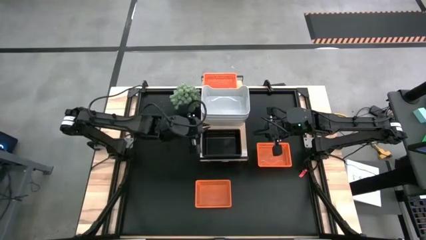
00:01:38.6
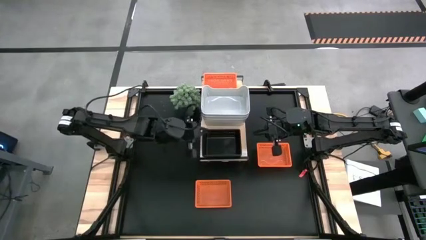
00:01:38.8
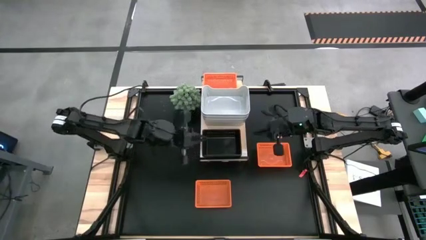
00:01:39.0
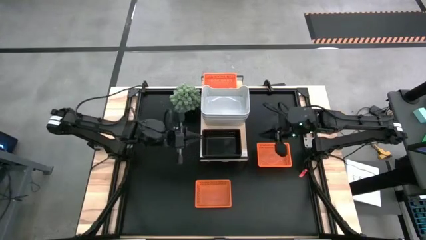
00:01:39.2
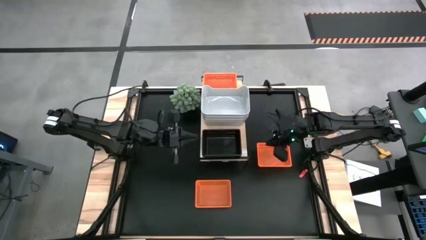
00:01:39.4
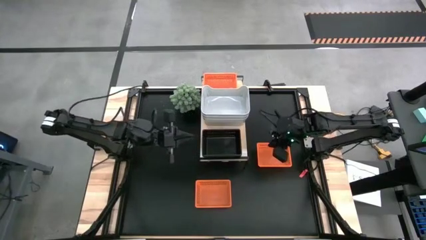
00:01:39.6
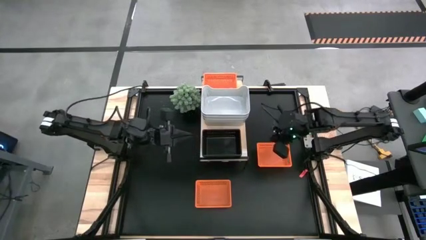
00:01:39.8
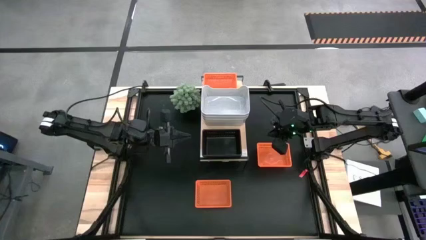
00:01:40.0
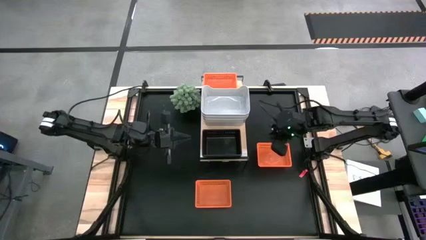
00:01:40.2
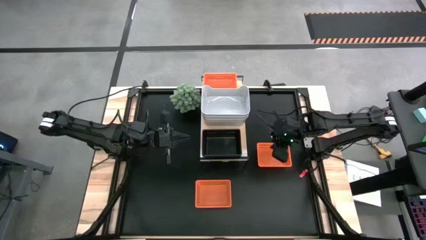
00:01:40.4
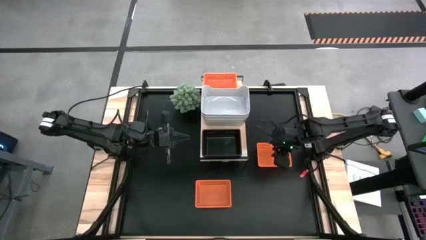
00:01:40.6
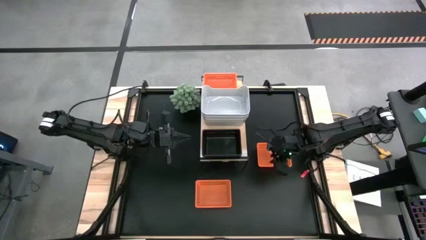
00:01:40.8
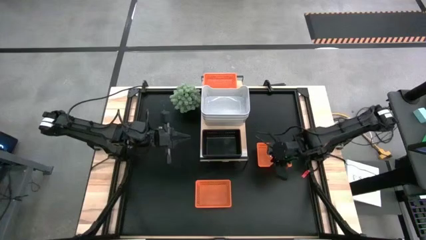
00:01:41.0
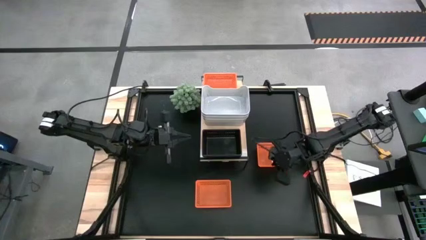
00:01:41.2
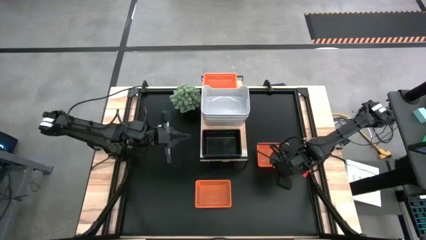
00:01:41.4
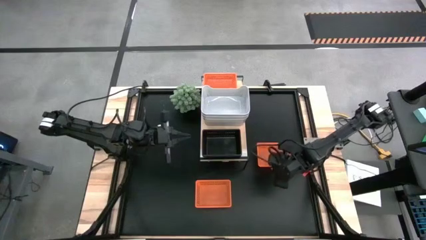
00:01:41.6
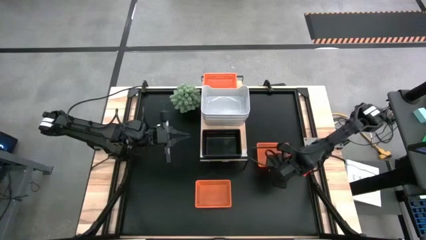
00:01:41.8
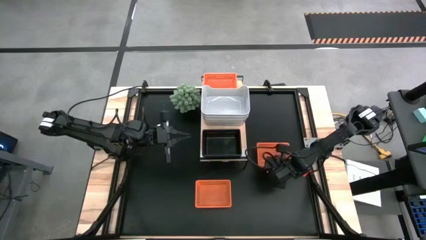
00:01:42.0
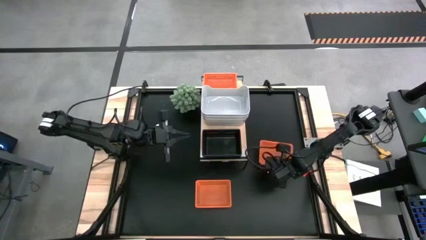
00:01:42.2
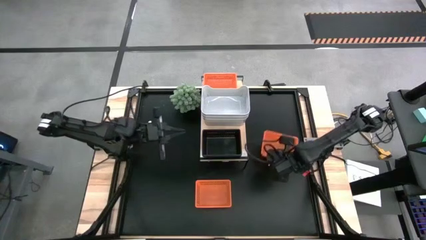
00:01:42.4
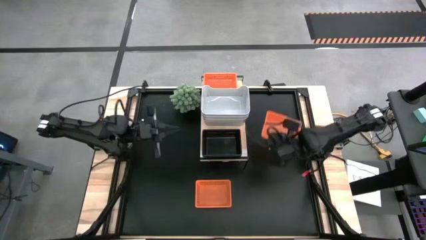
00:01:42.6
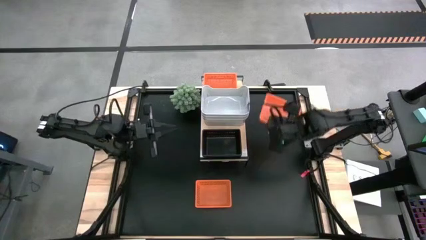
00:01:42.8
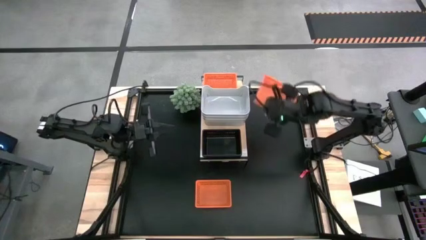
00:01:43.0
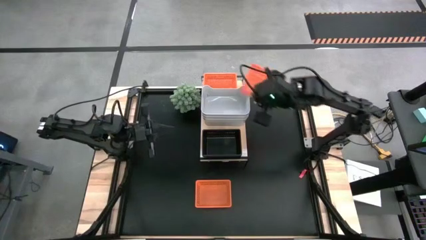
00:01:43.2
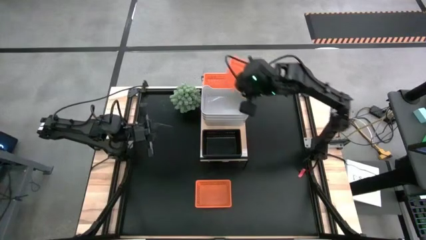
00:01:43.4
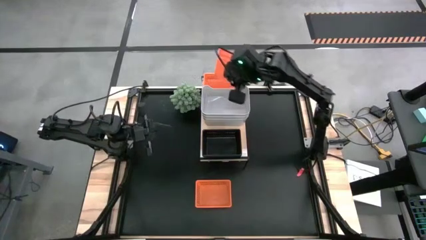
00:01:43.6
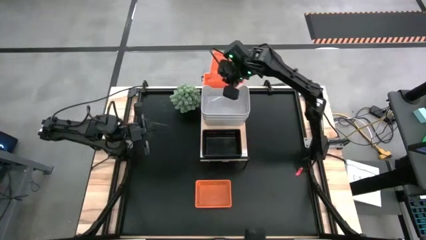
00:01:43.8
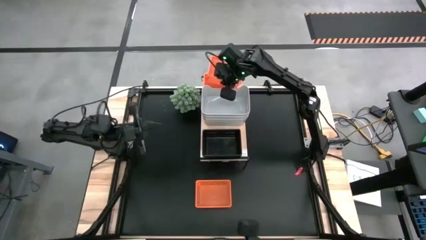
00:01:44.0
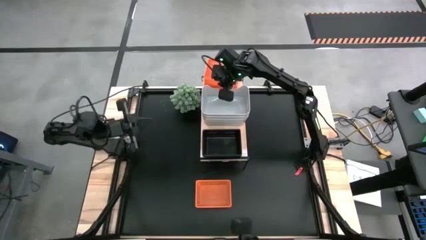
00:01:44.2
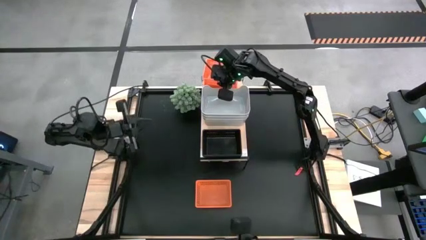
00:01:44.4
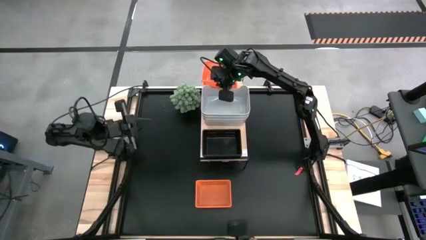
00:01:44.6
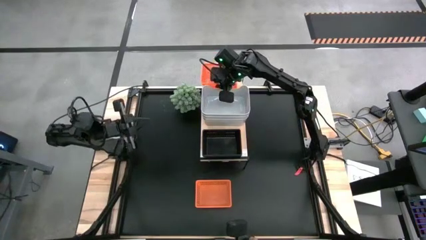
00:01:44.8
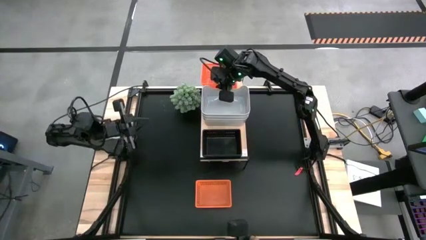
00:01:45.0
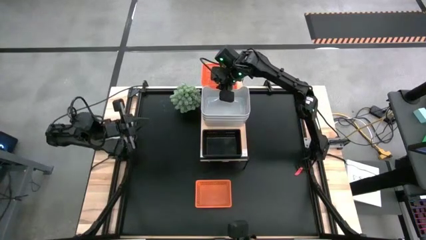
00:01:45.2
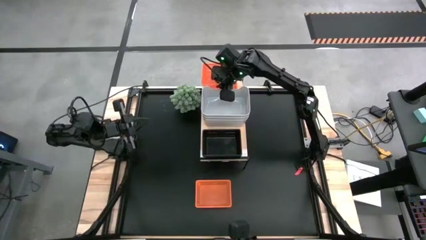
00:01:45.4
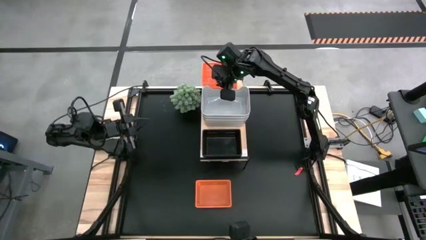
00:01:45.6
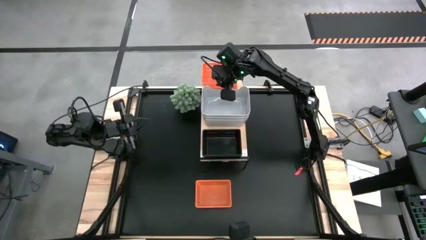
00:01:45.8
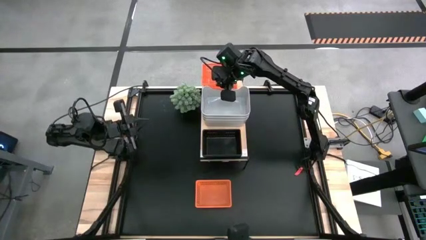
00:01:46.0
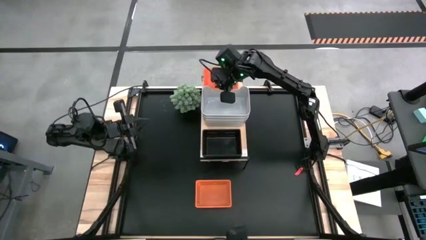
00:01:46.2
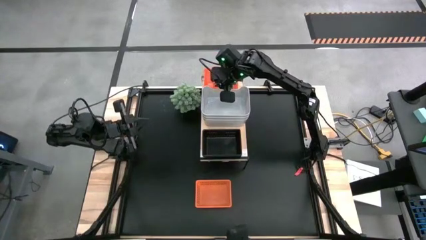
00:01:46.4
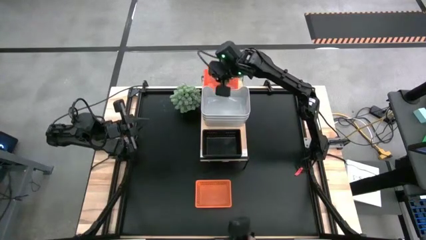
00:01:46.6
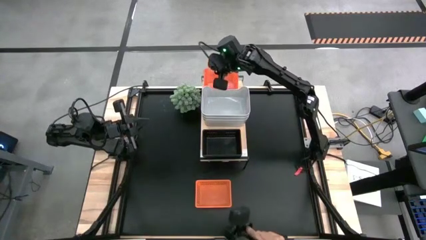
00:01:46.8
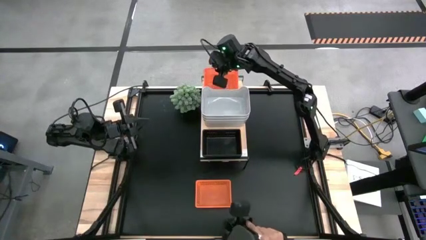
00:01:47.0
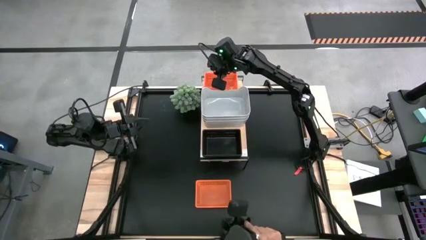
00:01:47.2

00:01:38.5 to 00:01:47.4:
Task: Stack baskets on shelf by color
Stack the top orange bin into the orange bin on the shelf

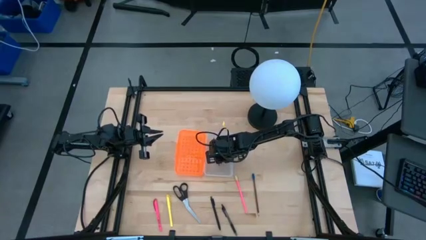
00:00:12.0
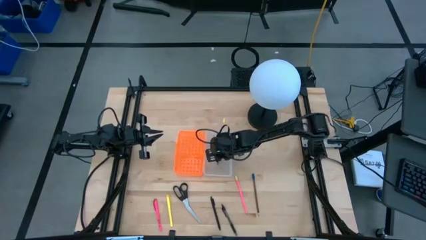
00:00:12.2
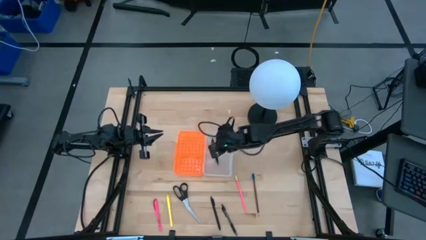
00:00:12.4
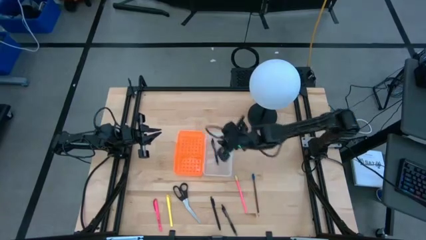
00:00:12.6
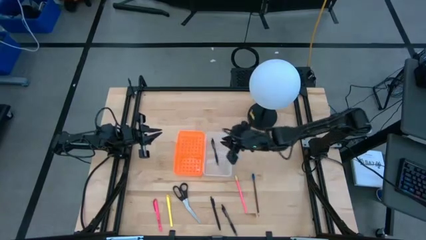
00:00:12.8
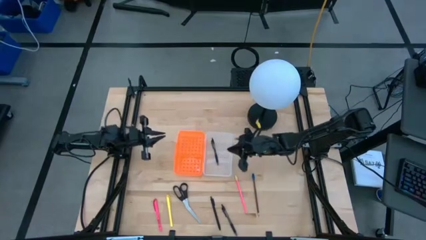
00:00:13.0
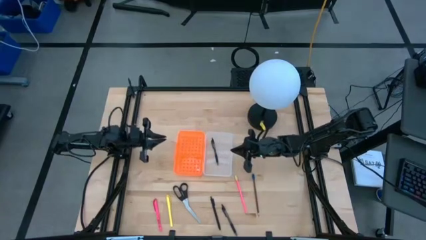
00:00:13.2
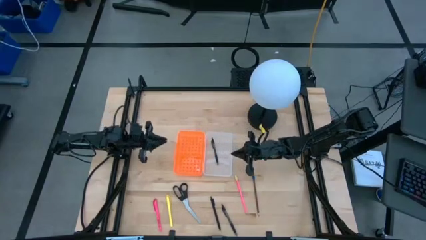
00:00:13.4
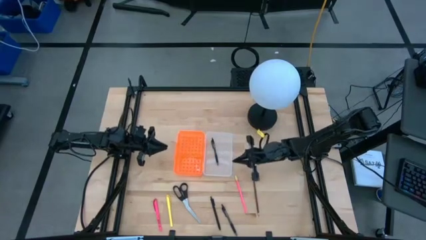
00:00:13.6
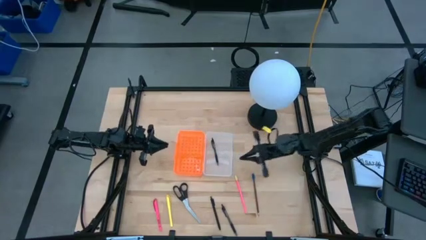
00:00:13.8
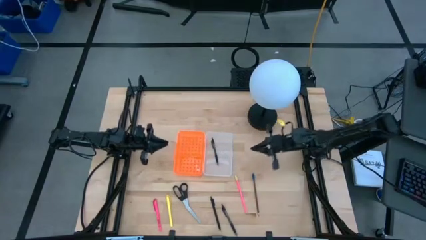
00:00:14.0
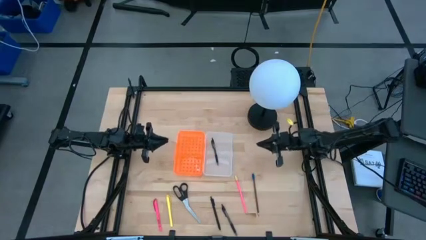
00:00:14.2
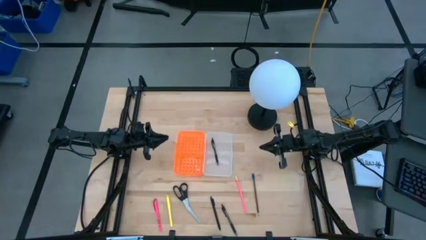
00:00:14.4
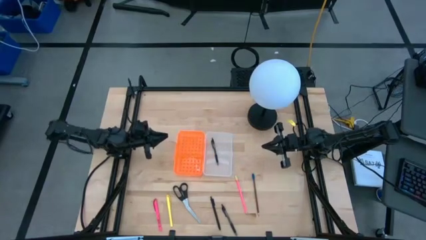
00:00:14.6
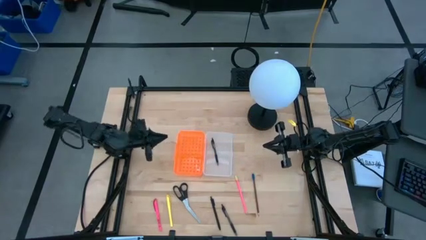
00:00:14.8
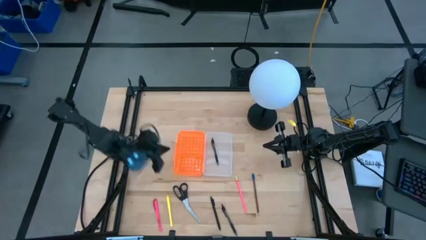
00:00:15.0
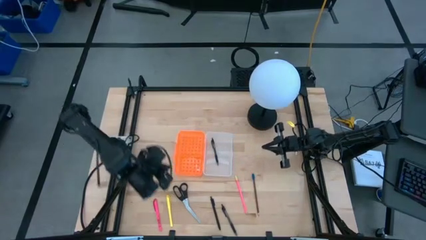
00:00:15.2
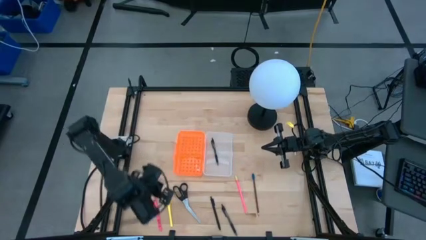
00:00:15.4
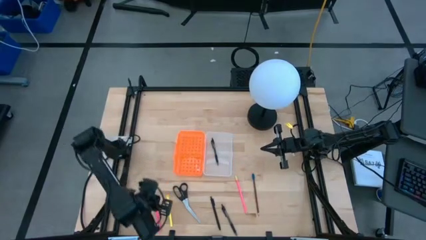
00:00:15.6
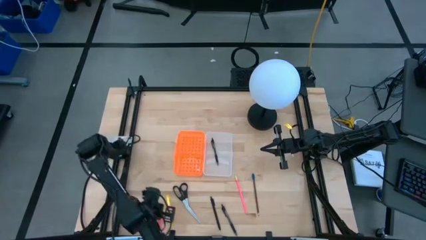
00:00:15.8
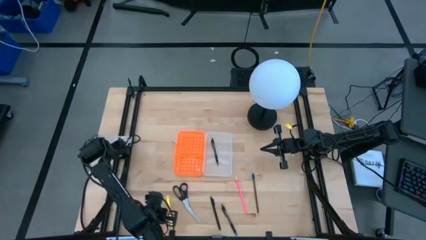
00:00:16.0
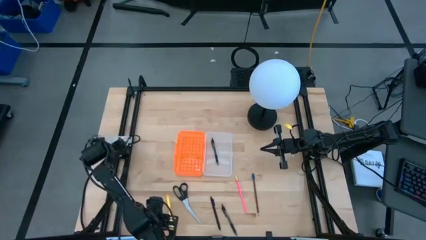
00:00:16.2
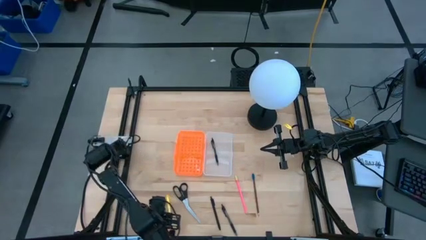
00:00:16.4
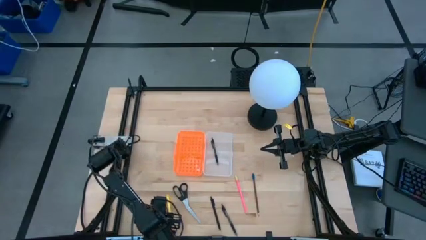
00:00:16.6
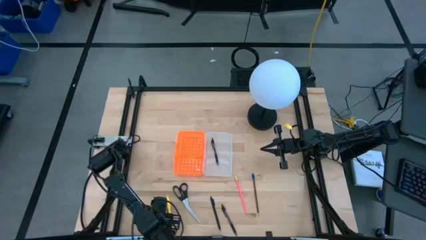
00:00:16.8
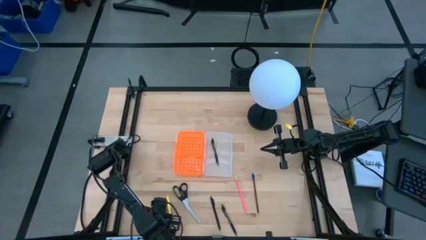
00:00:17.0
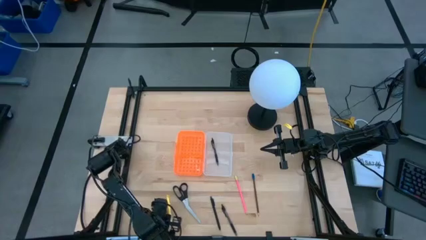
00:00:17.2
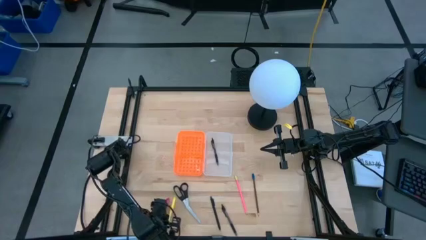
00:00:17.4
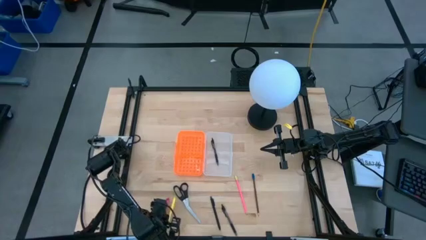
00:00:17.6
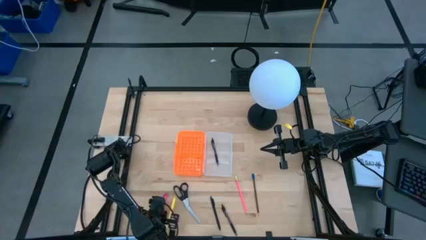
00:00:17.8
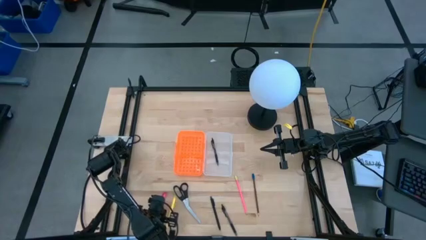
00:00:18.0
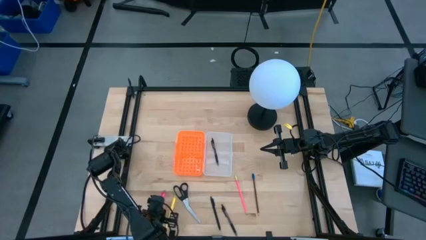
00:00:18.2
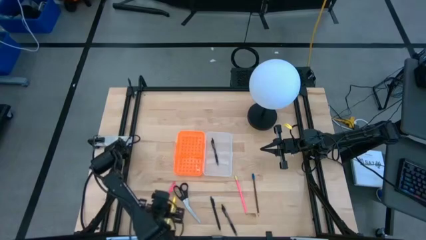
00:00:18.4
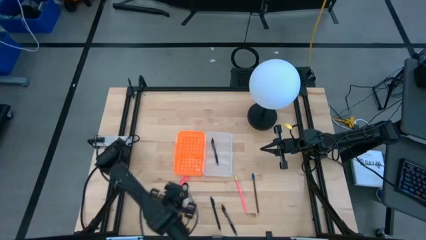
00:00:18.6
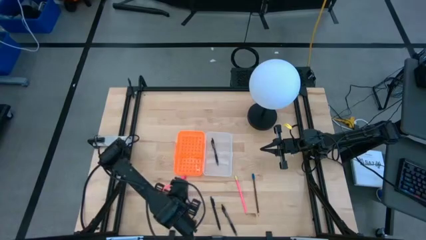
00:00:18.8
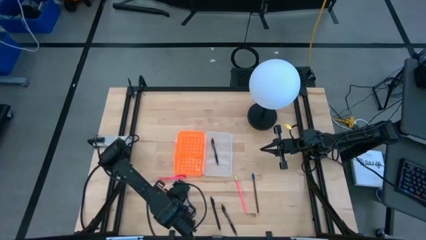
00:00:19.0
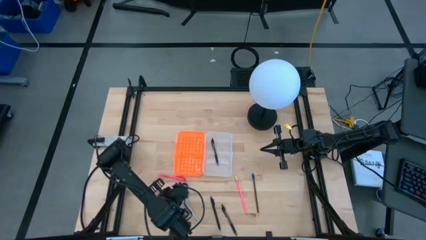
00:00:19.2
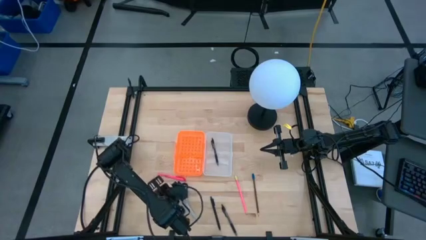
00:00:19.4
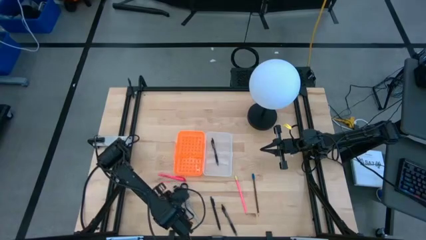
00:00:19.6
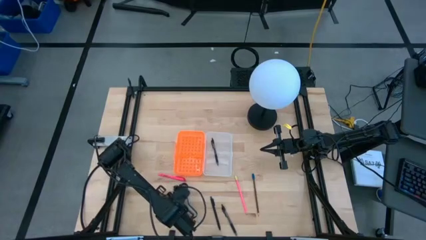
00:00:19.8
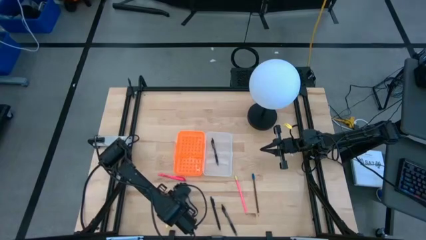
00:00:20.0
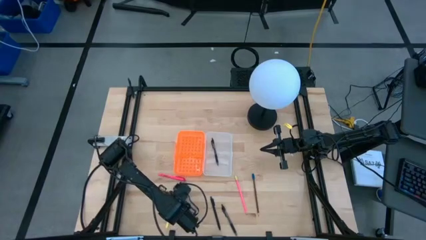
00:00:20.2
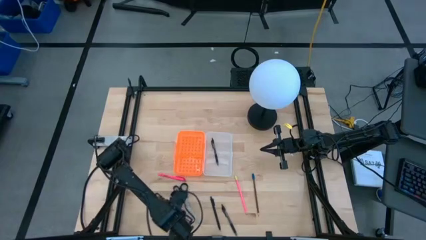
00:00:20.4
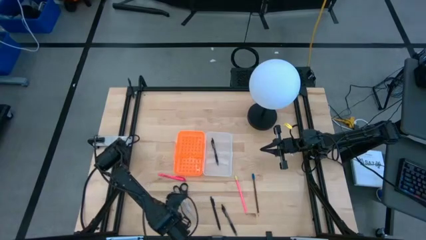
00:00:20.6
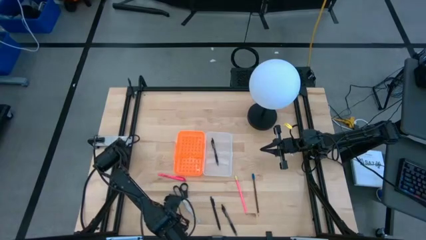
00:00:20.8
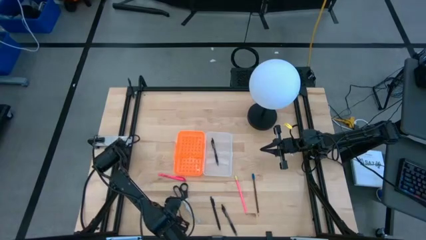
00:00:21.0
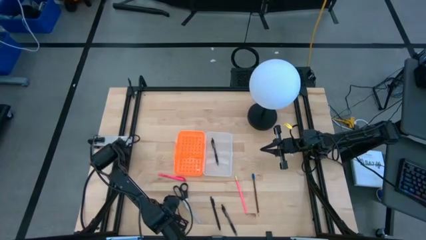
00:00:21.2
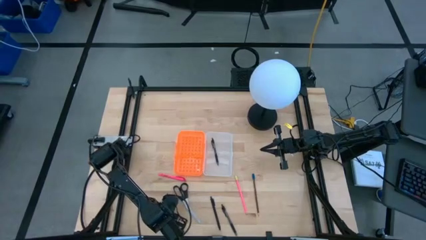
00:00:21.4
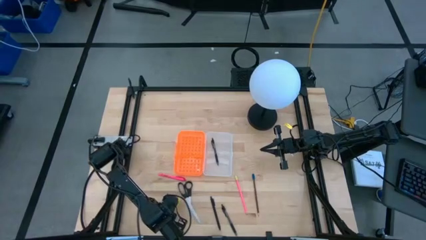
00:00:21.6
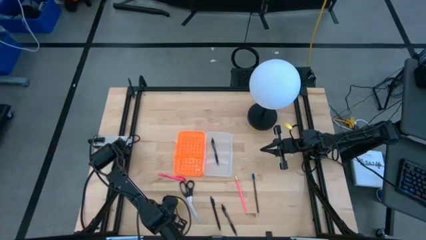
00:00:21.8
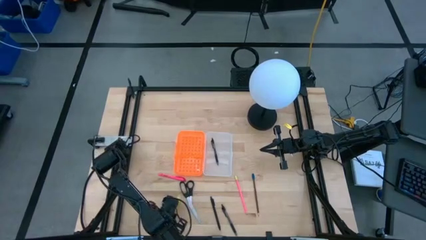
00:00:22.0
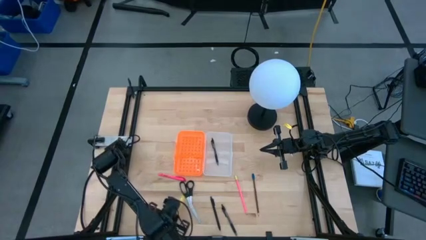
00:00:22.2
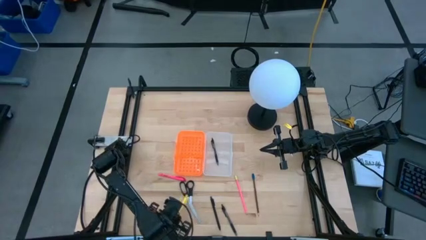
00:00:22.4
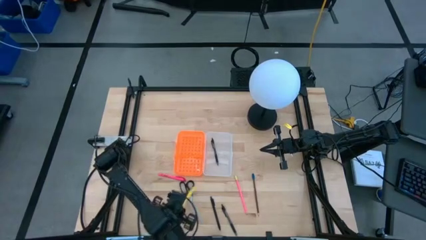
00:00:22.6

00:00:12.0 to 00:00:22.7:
Task: Pick & place school supplies into a supply box
Put the pink and yellow pen into the supply box
